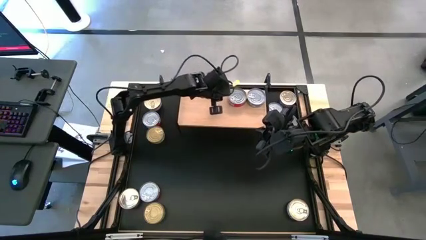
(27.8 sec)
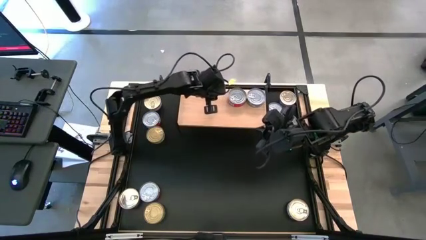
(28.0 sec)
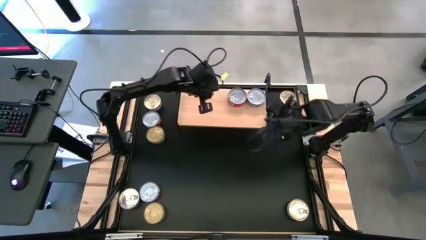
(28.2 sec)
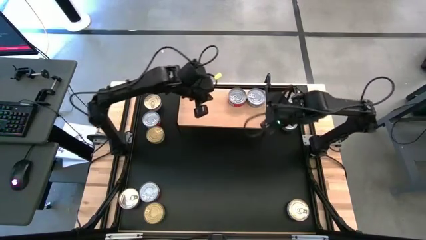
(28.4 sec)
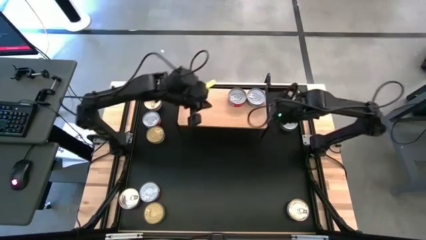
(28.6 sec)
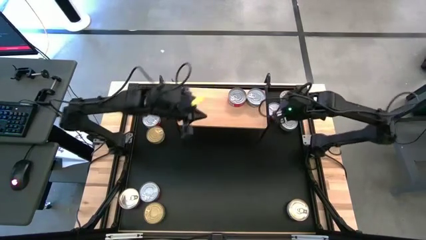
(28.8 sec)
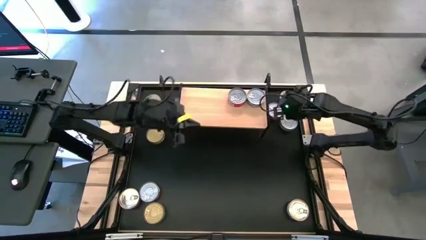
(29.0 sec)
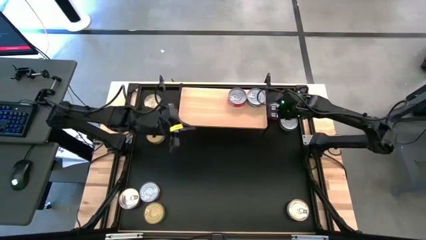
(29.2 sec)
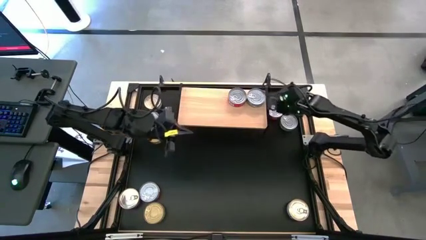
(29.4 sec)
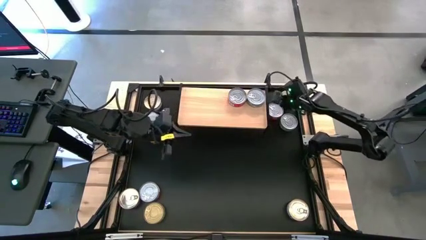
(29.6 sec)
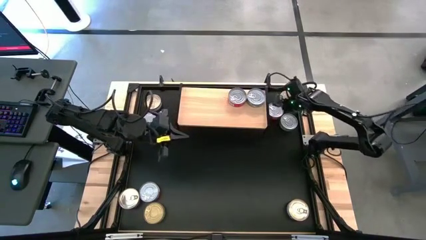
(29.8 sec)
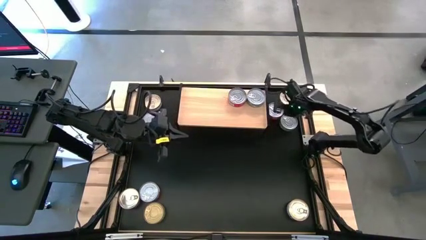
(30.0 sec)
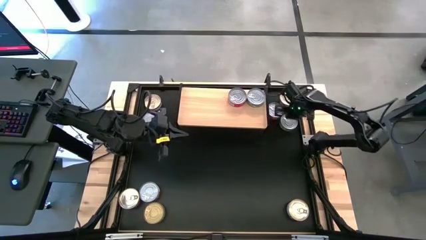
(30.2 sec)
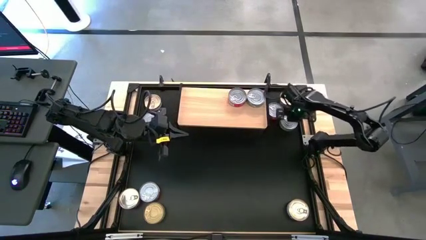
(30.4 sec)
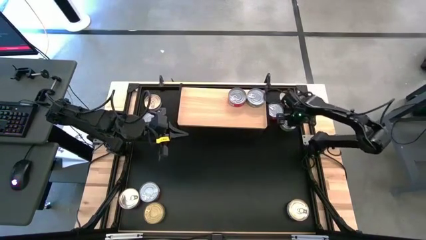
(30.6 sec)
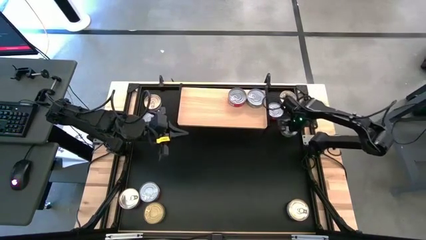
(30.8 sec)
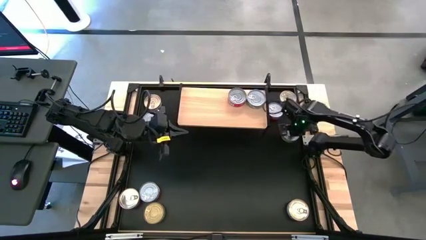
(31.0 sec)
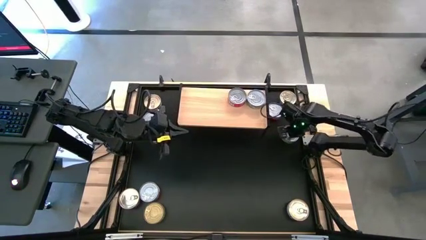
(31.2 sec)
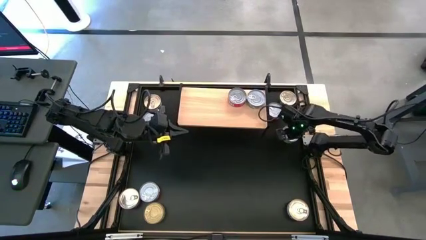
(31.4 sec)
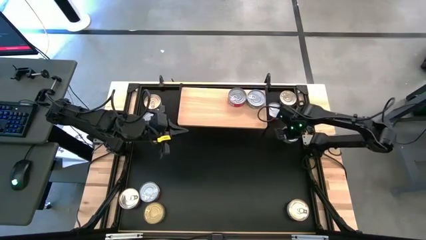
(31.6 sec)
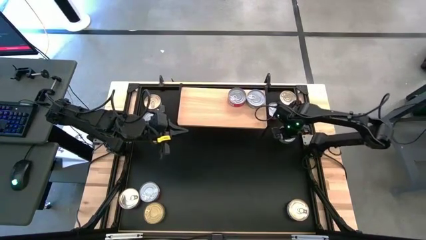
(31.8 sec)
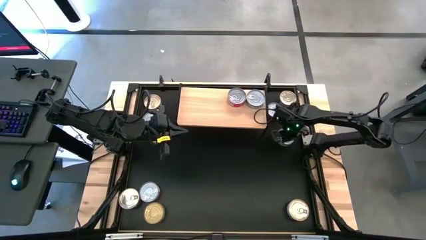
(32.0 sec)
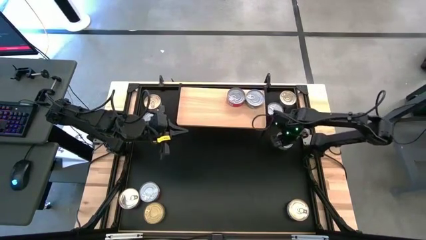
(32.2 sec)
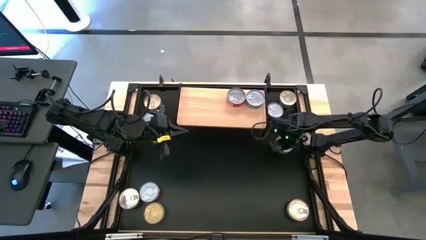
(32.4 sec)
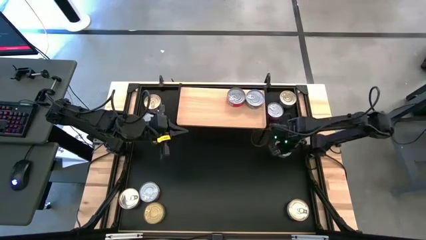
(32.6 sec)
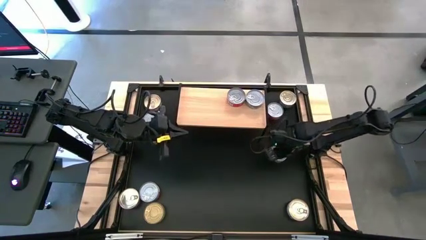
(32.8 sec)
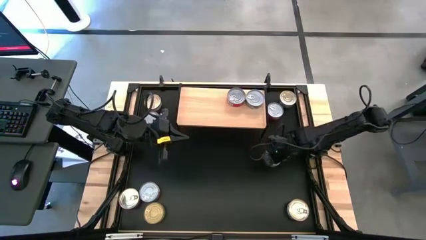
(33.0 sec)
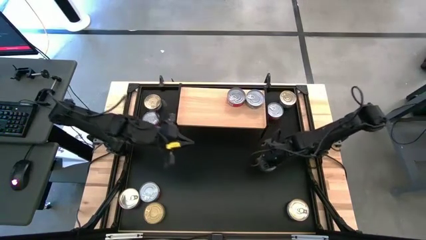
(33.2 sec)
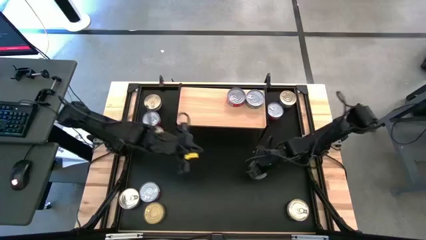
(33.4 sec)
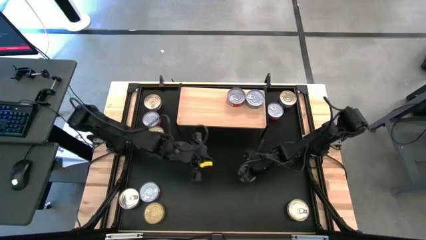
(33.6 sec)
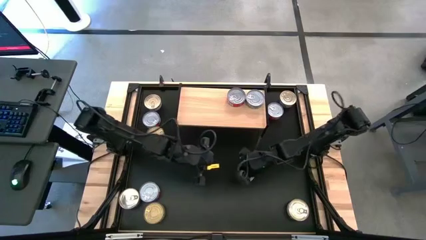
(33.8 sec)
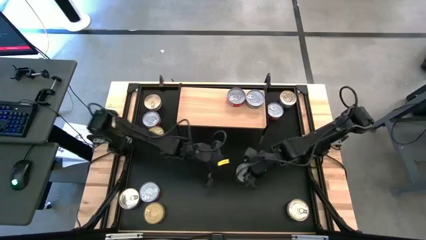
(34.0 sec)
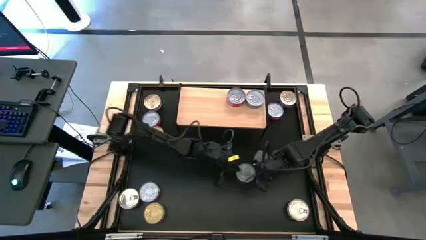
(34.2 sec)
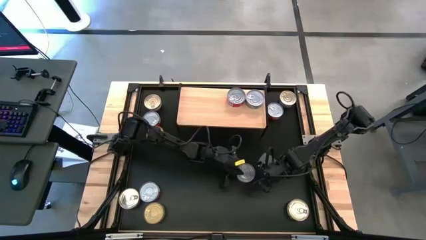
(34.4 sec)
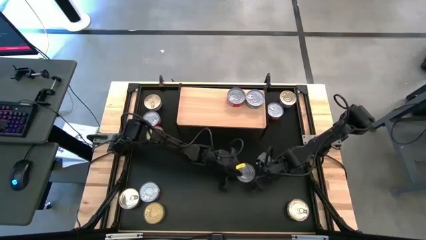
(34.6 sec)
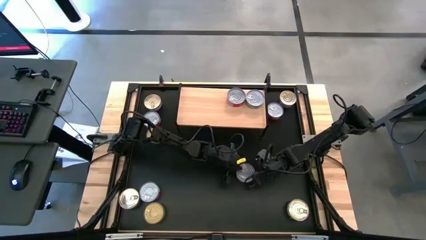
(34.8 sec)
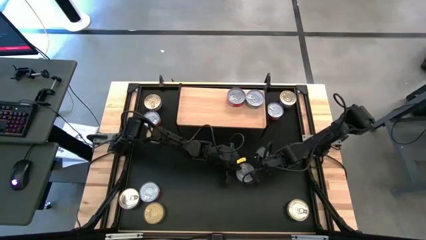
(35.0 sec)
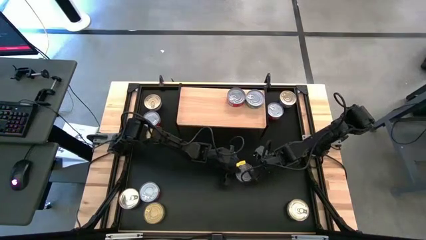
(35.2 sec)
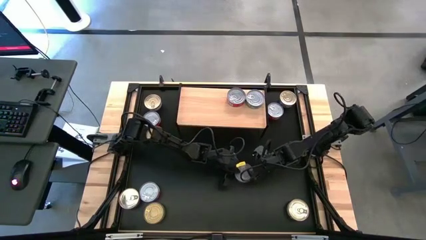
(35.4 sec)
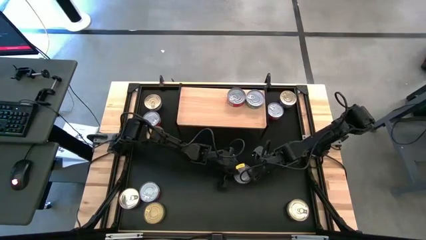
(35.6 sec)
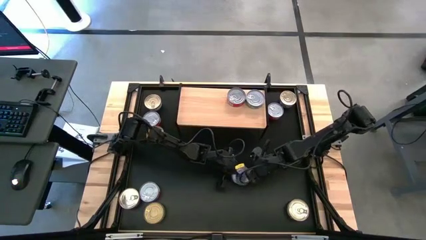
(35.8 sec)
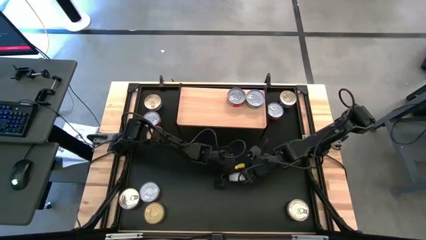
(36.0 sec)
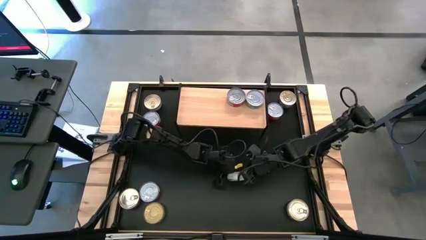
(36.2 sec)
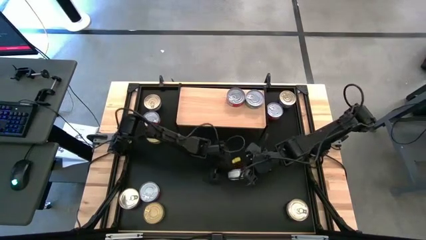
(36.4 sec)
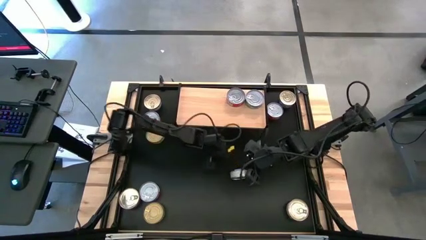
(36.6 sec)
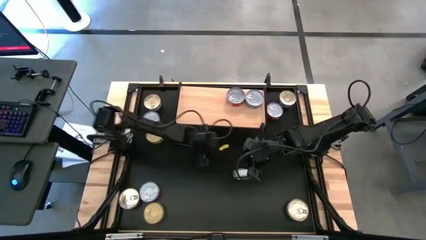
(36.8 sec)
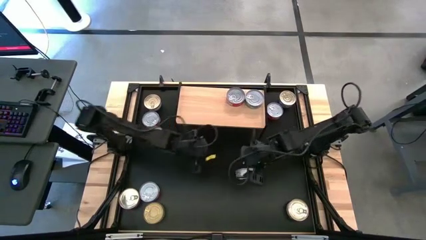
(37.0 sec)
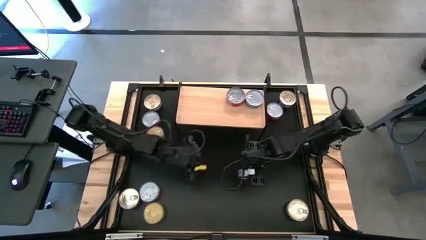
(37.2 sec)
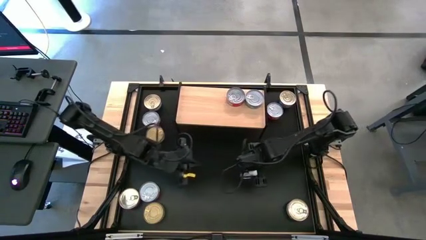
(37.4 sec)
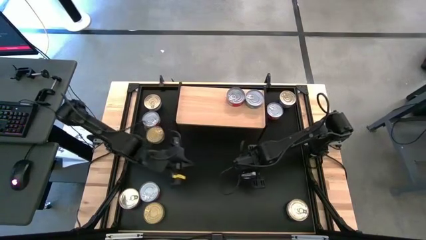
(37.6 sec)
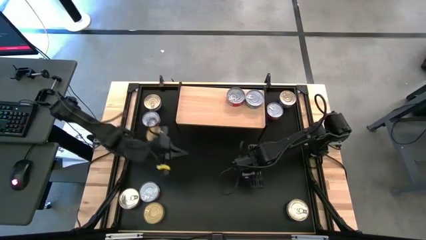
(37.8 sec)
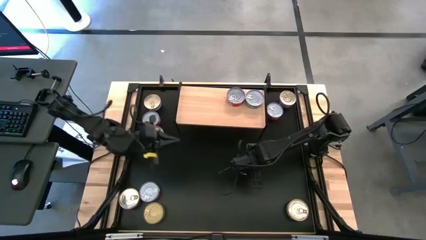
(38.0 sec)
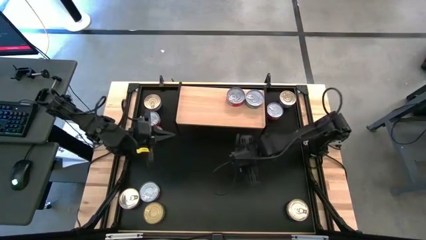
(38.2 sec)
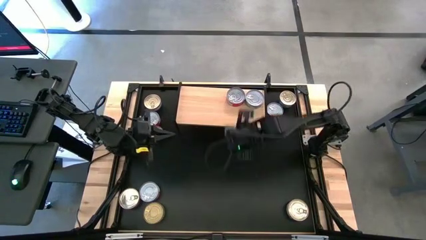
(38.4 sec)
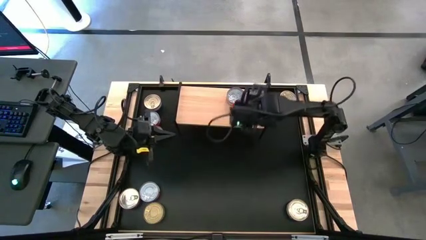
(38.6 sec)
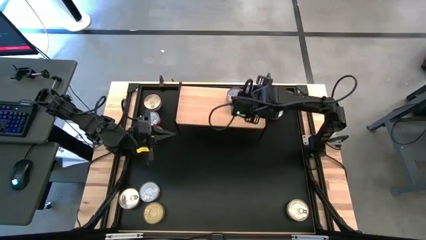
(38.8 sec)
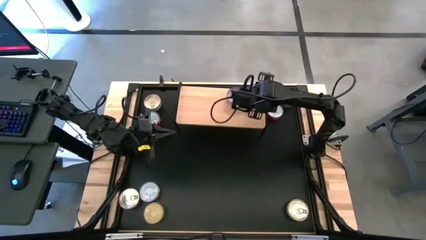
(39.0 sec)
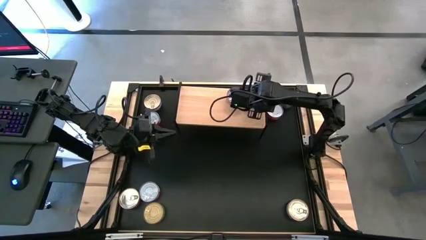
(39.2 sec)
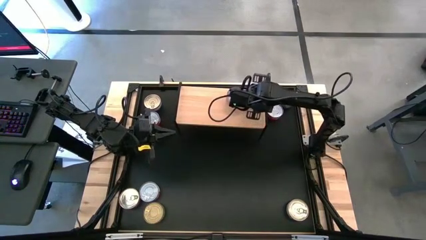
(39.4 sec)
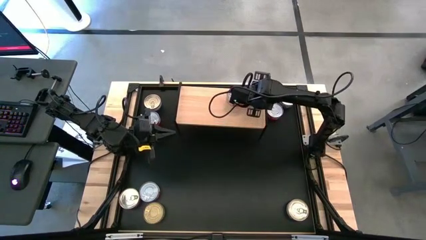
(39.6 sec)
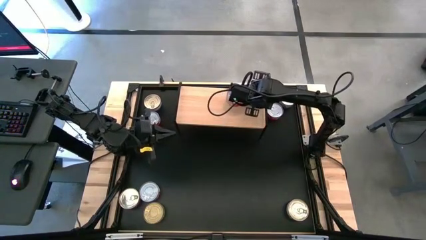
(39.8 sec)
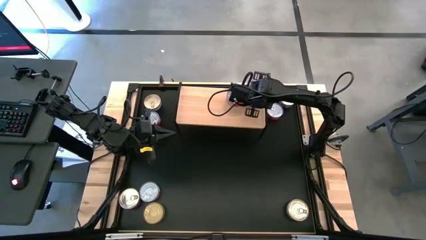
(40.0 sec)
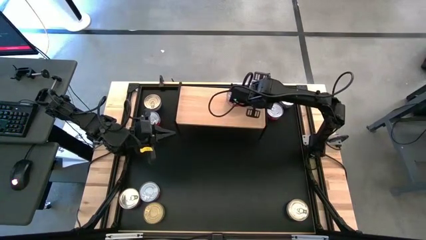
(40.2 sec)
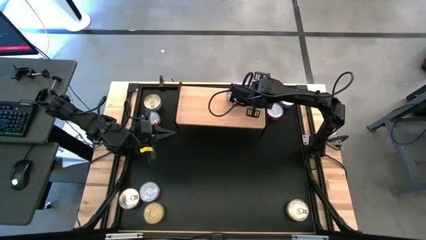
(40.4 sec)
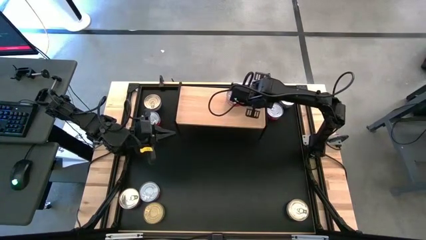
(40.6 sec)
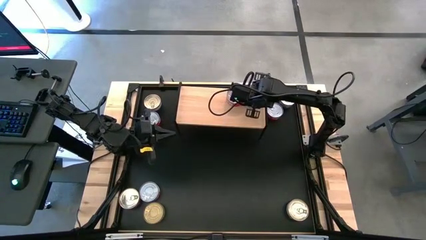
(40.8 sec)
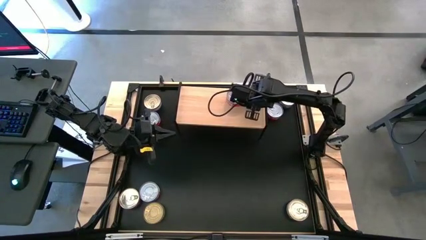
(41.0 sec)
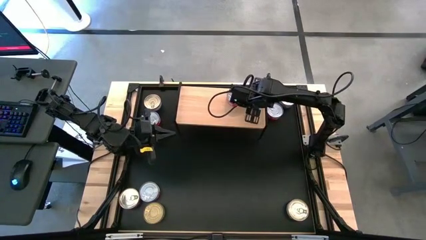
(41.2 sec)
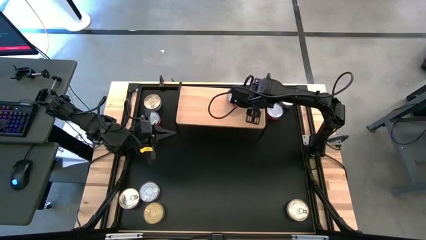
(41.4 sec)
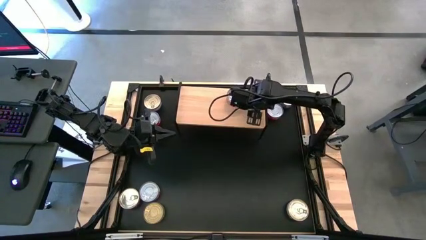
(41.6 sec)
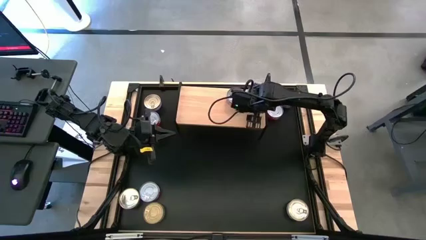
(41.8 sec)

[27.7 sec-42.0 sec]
Task: Stack canned seafood by type on shelf
Stack the green tuna can on top of the green tuna can on the shelf
